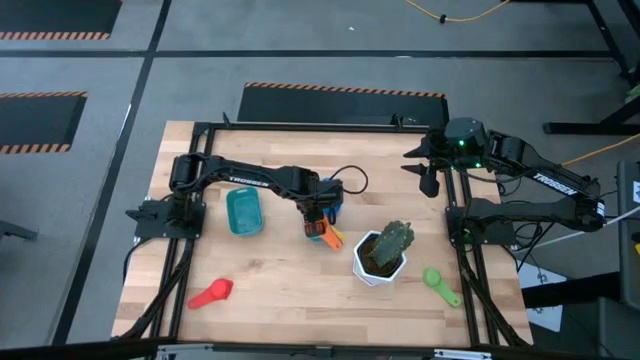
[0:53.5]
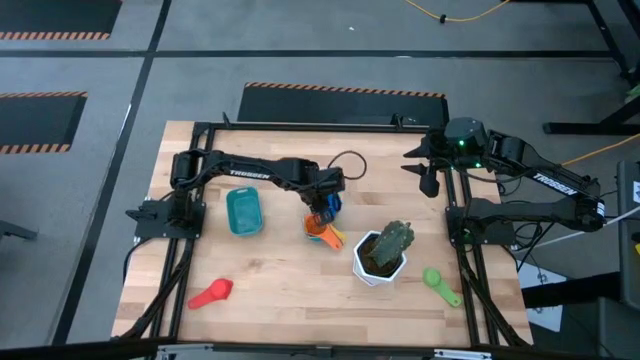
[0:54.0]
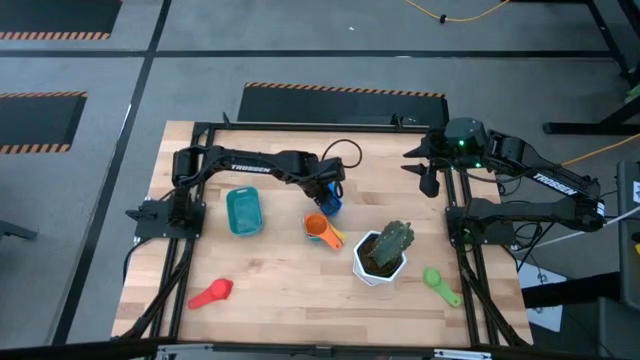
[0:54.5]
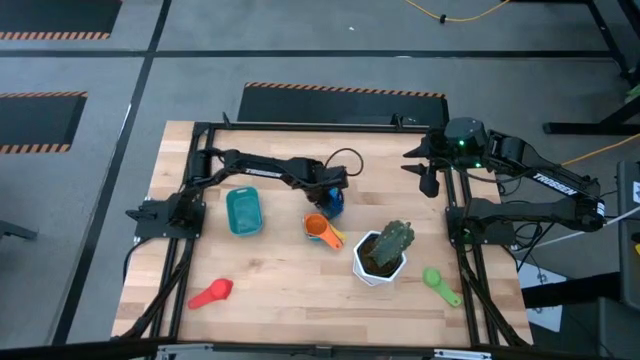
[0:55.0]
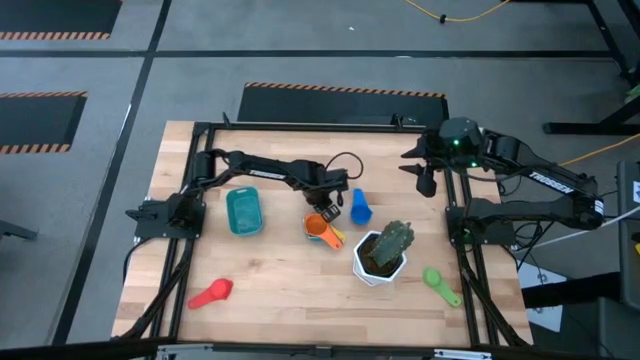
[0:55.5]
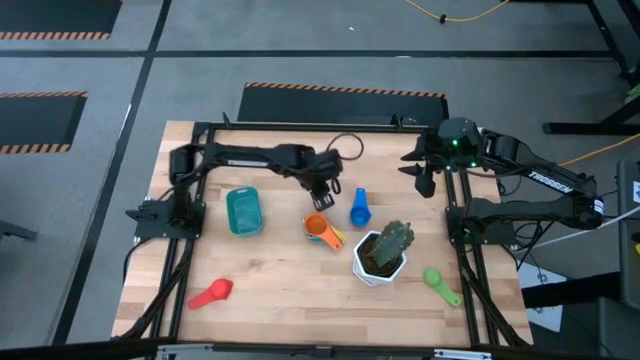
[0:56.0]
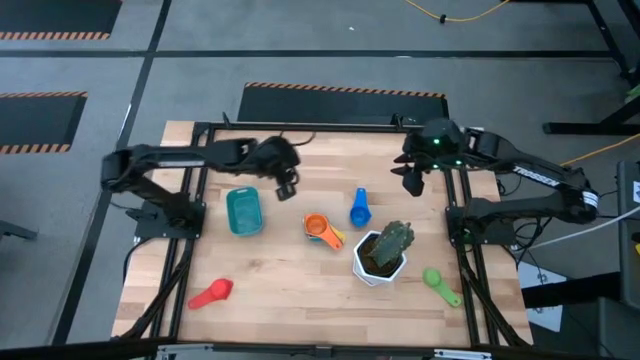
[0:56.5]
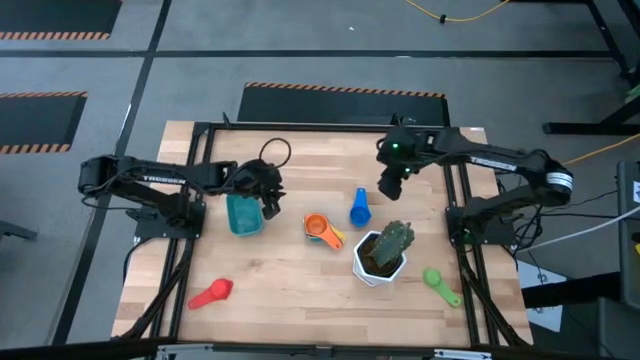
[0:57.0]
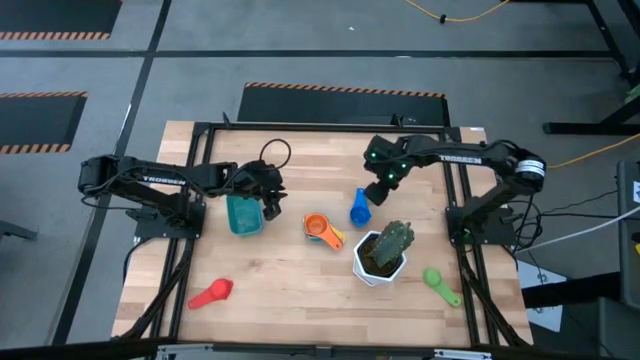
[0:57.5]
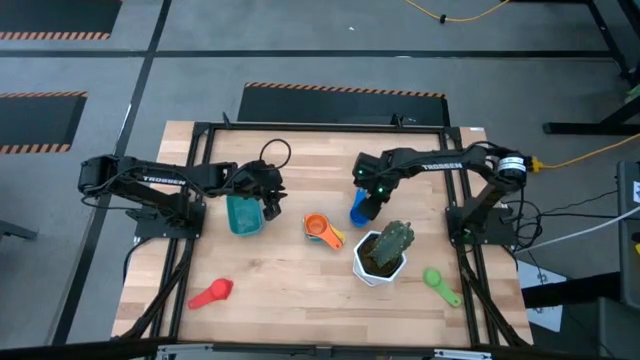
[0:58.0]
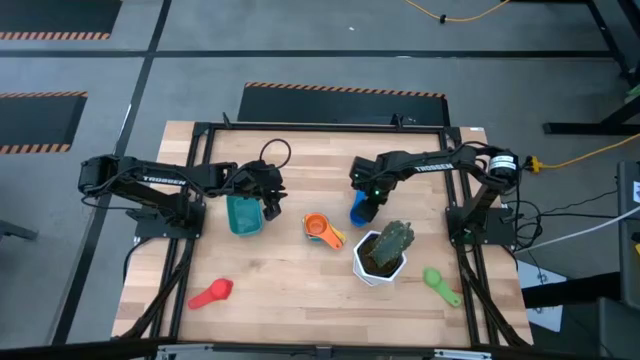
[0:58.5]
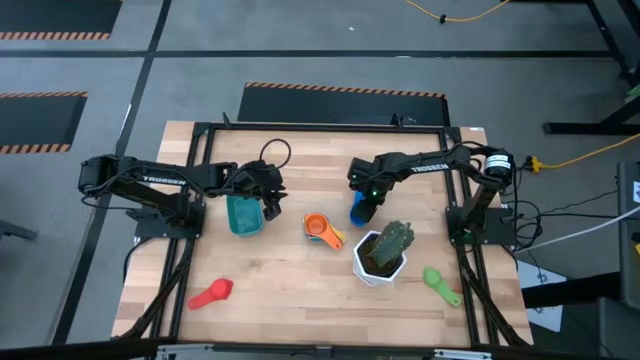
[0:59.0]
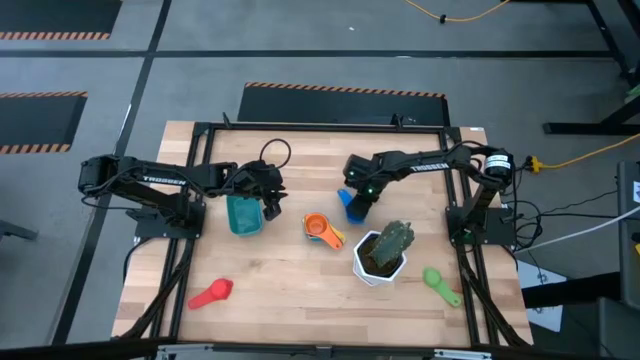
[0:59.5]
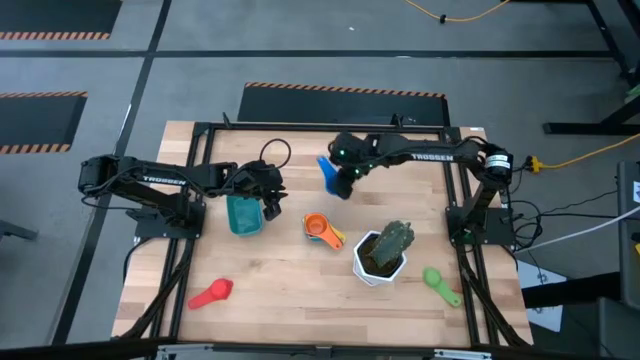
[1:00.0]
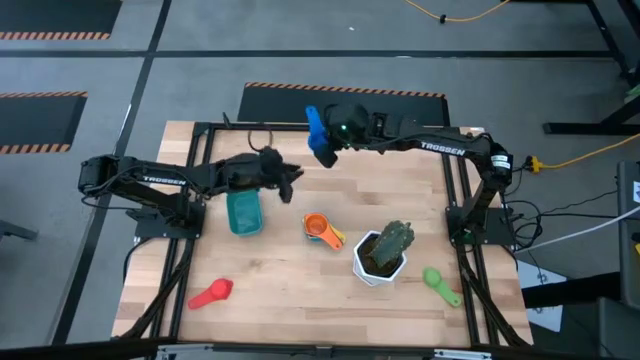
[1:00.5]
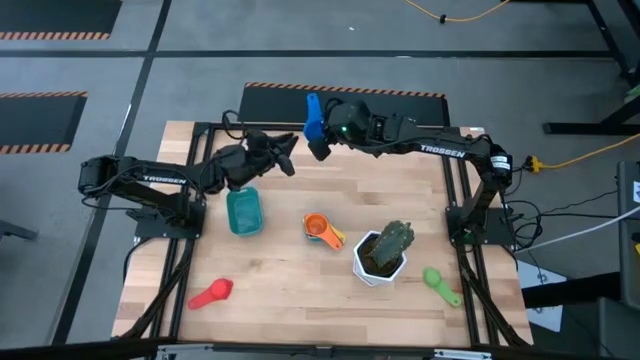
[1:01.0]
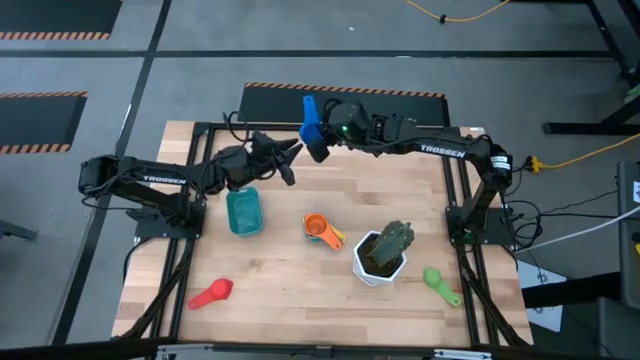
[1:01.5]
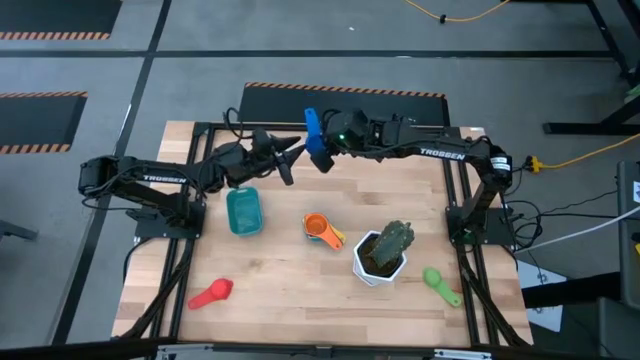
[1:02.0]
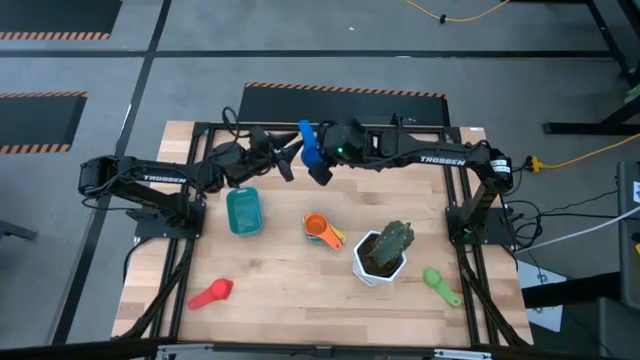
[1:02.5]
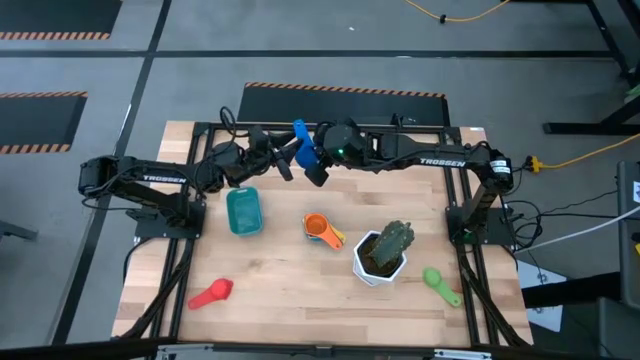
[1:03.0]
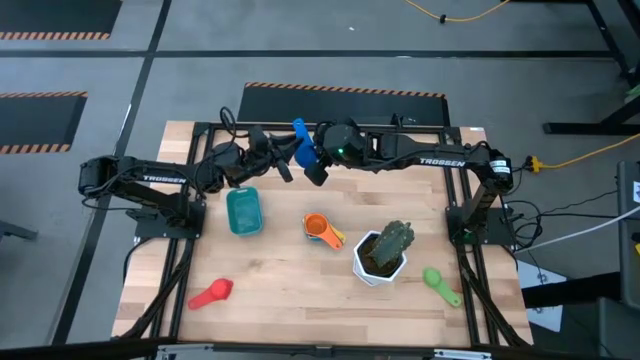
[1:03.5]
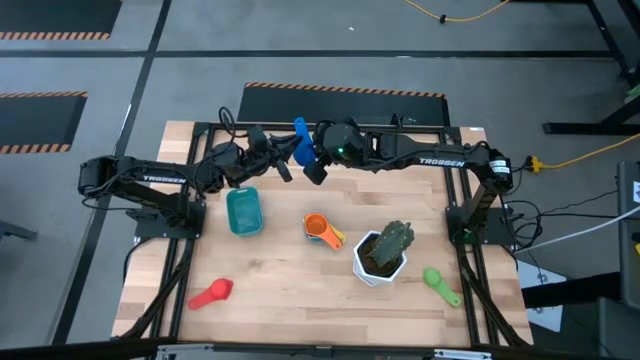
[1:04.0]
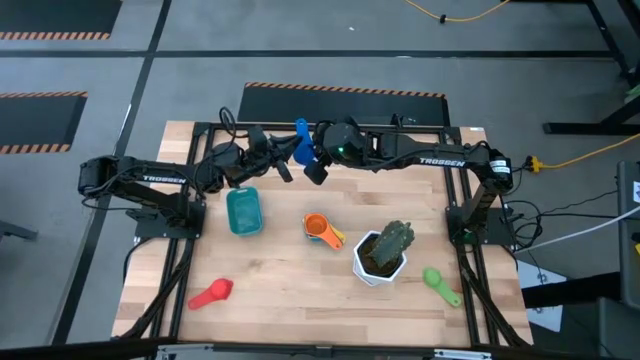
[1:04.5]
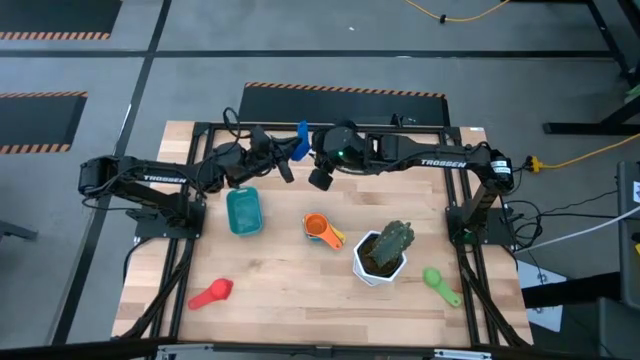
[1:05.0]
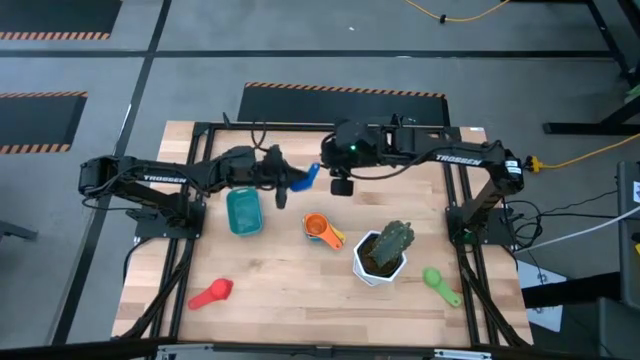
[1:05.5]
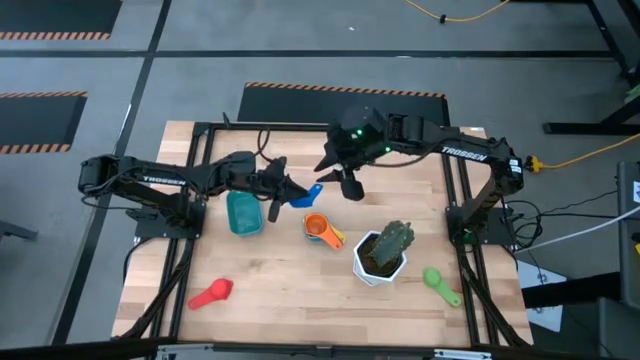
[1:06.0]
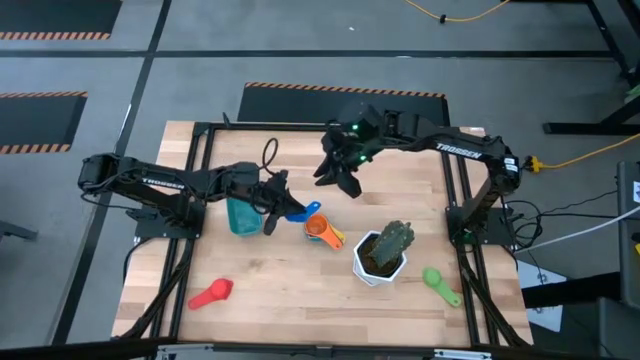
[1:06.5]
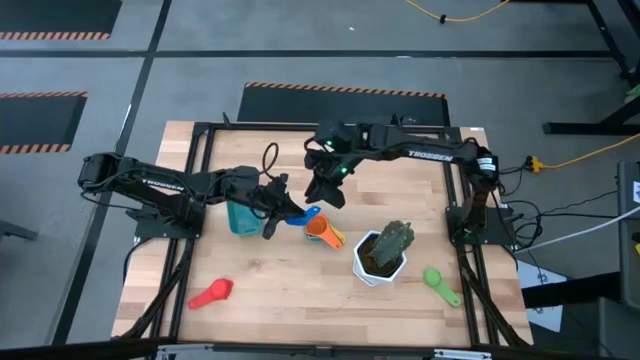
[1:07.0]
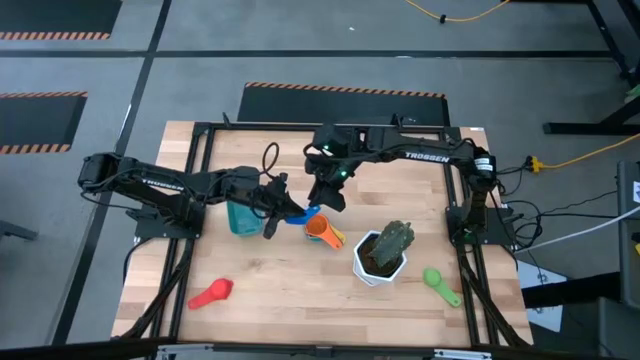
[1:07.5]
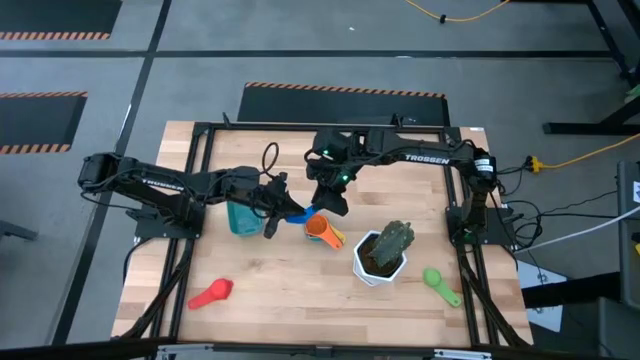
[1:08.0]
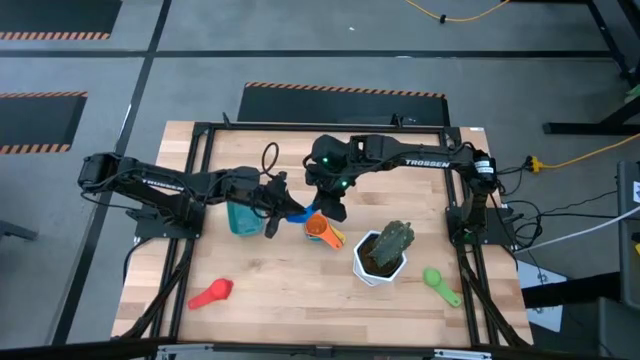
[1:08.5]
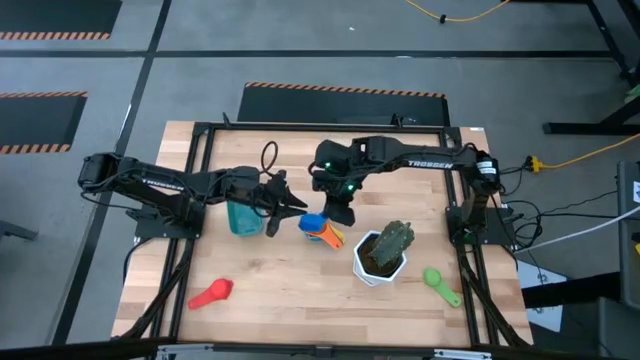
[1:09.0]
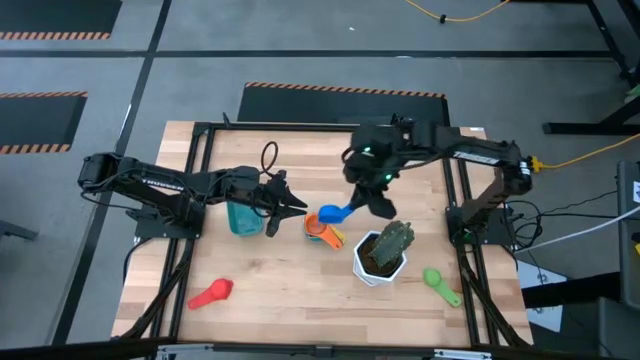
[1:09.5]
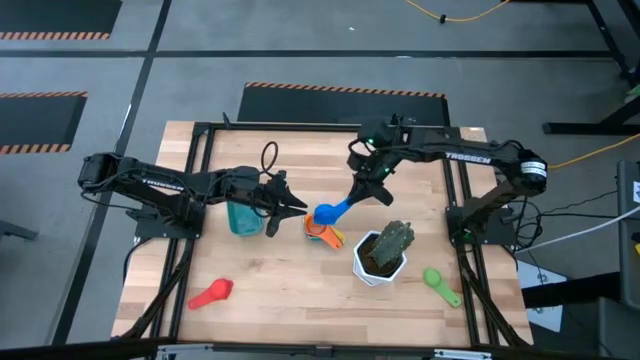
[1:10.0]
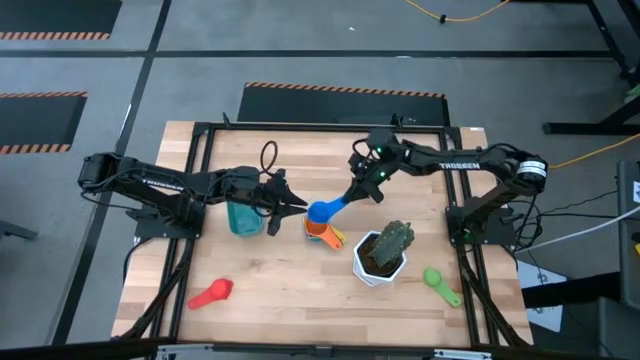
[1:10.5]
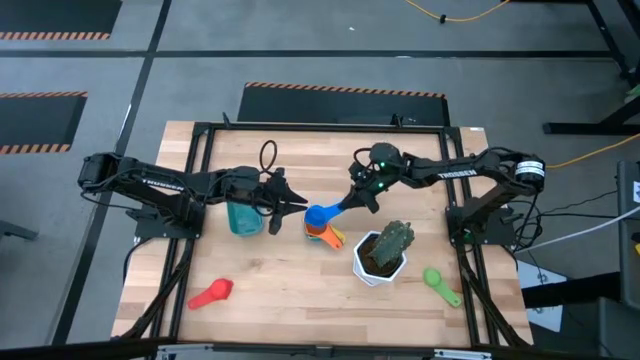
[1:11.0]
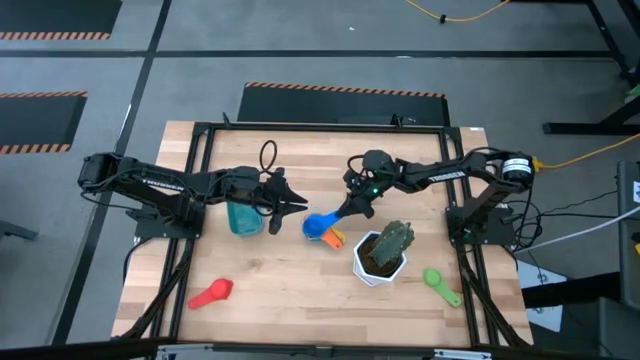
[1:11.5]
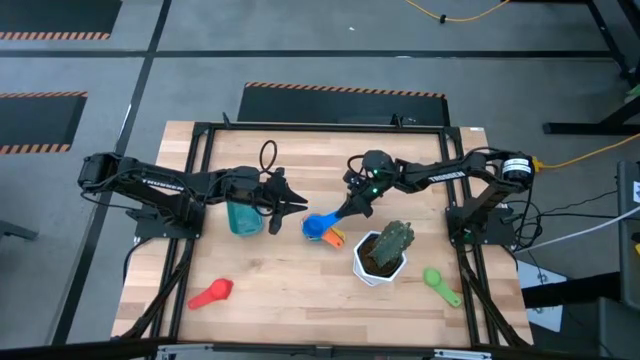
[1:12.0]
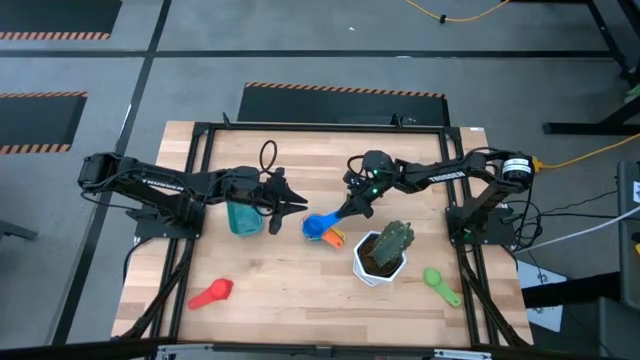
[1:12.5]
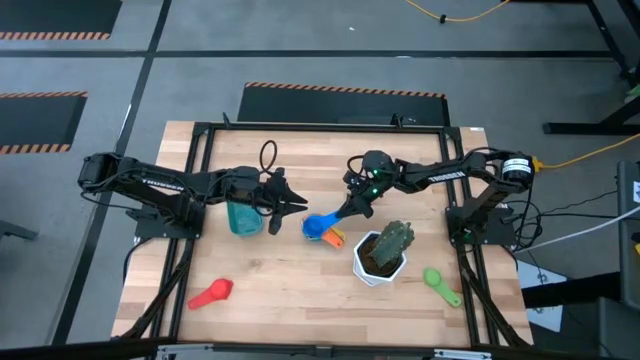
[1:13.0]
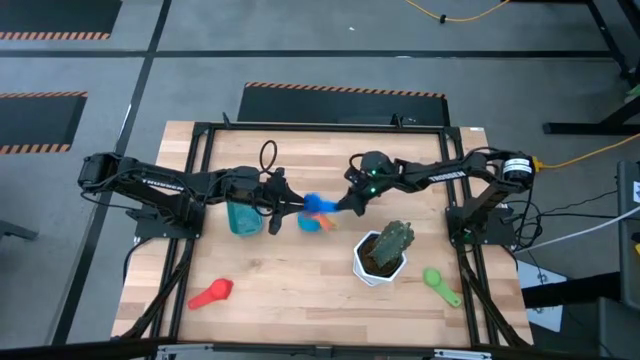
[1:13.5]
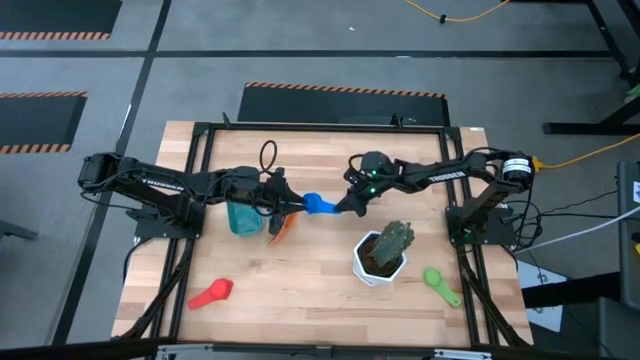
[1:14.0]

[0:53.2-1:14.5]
Task: Nest measuring cups in basket
Stack the blue measuring cup on top of the orange measuring cup

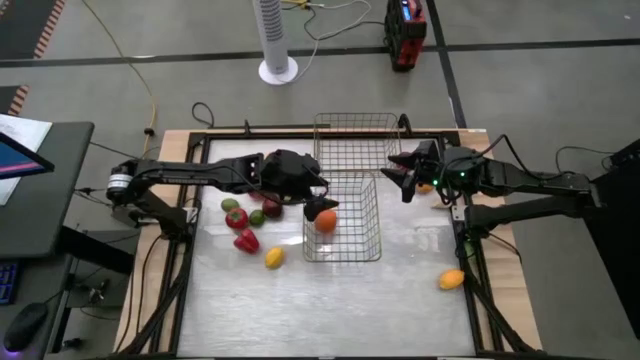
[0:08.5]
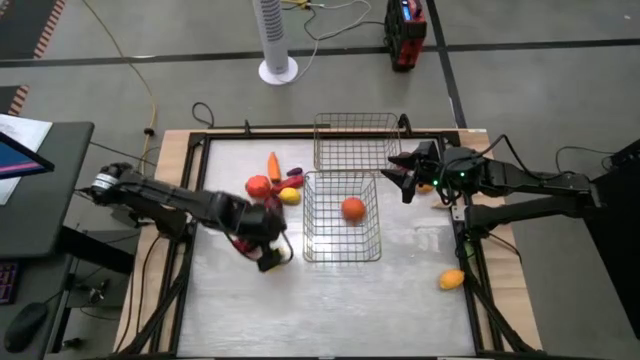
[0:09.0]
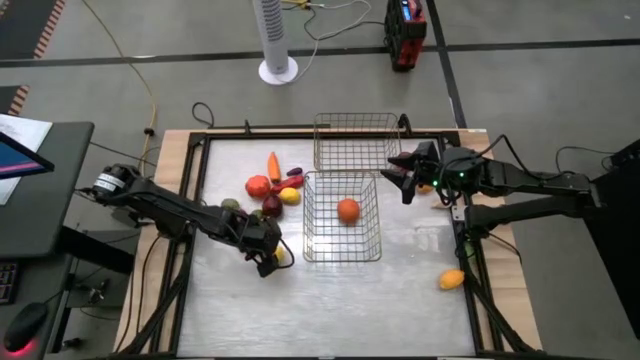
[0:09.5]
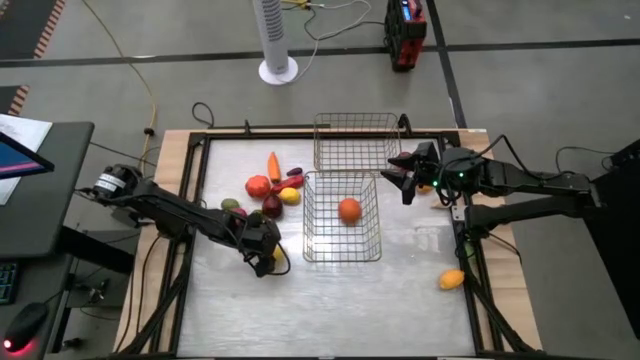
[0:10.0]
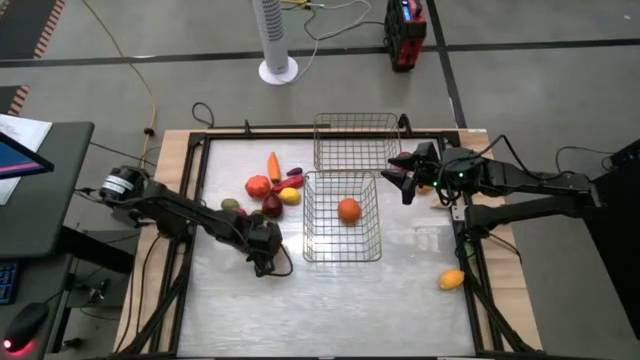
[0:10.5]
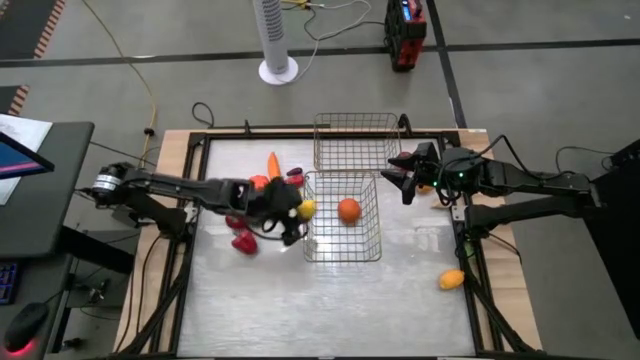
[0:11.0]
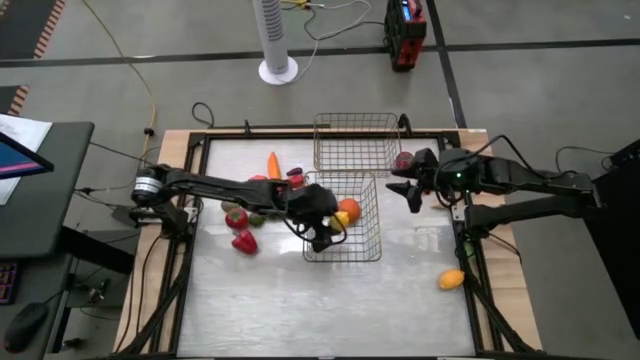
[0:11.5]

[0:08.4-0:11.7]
Task: Sort produce into baskets
Put the bottom left lemon into the bottom wire basket
